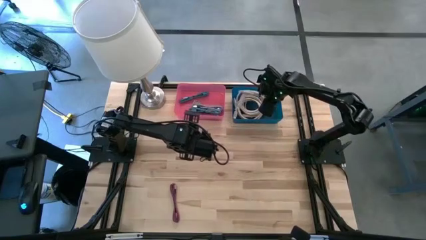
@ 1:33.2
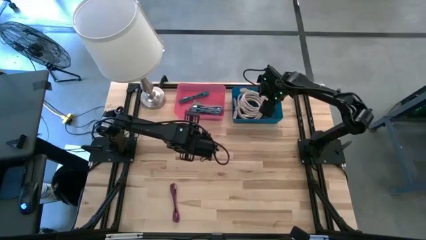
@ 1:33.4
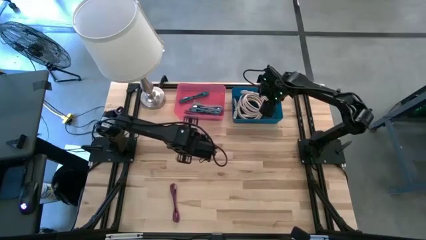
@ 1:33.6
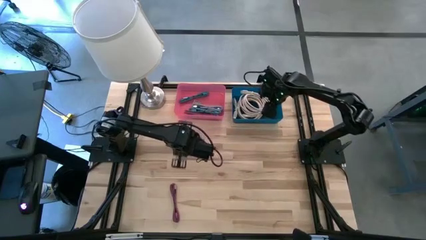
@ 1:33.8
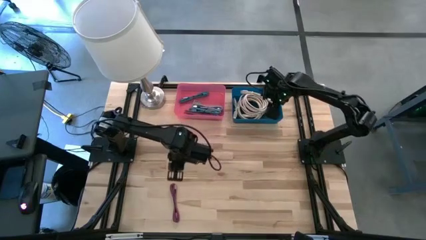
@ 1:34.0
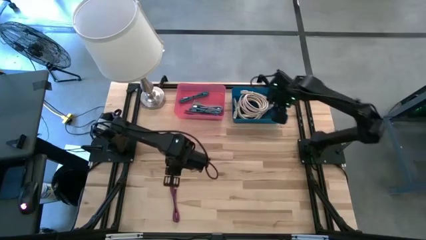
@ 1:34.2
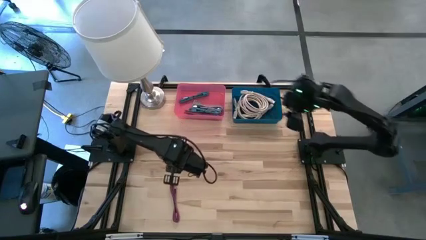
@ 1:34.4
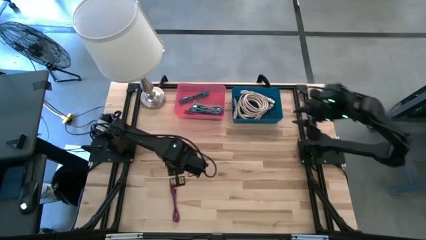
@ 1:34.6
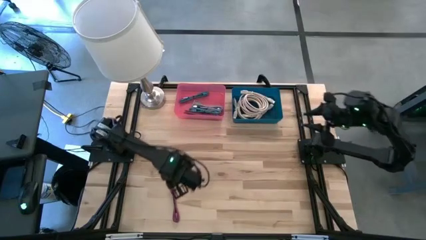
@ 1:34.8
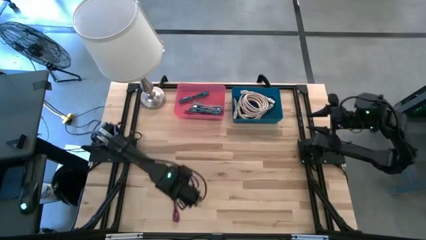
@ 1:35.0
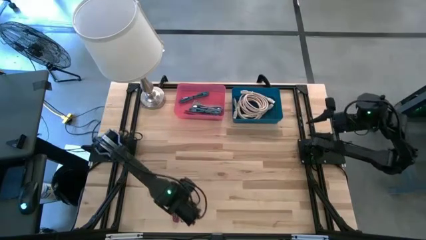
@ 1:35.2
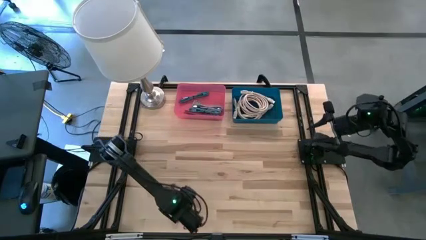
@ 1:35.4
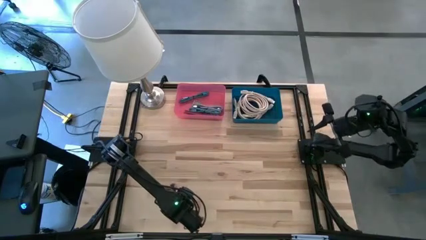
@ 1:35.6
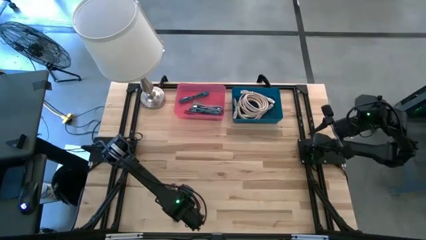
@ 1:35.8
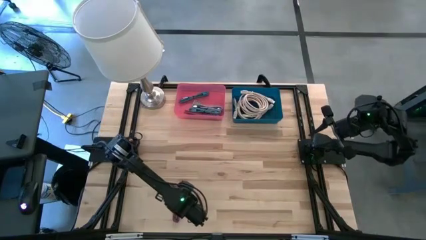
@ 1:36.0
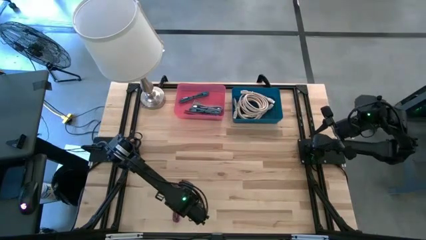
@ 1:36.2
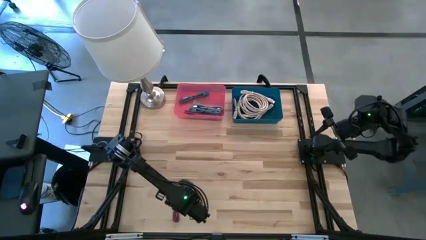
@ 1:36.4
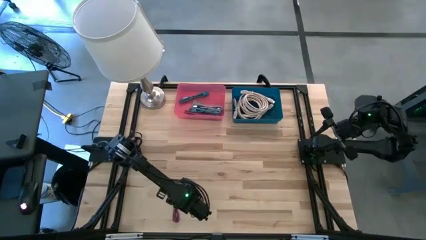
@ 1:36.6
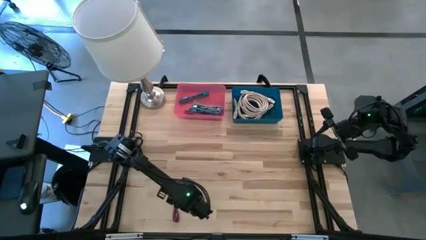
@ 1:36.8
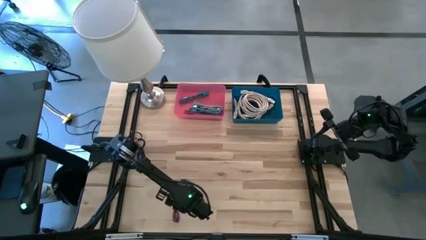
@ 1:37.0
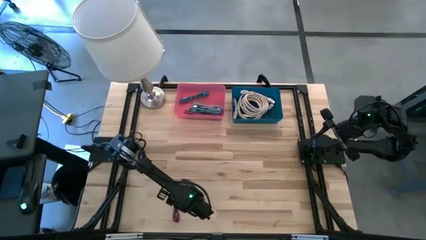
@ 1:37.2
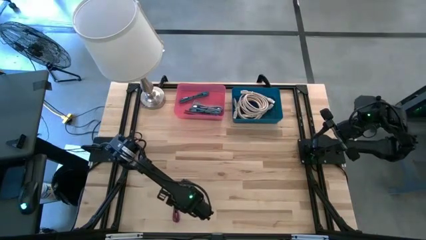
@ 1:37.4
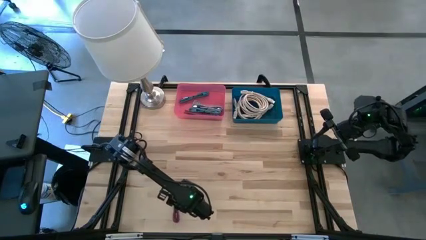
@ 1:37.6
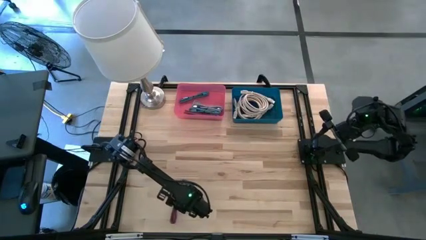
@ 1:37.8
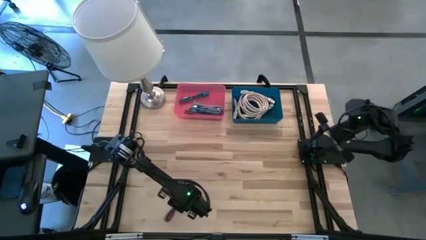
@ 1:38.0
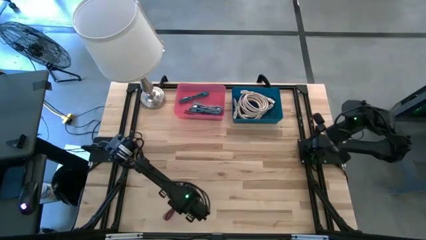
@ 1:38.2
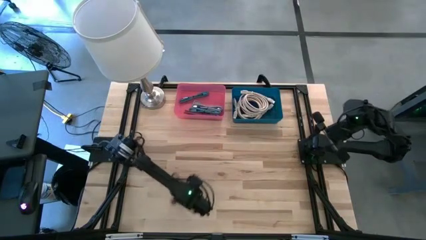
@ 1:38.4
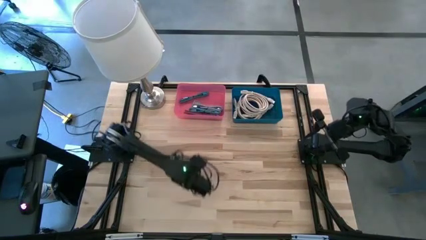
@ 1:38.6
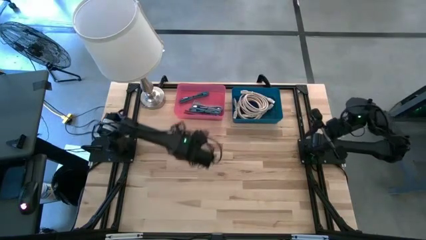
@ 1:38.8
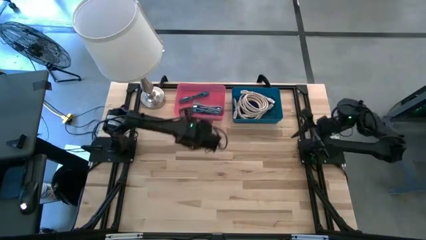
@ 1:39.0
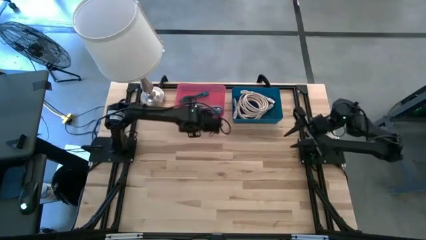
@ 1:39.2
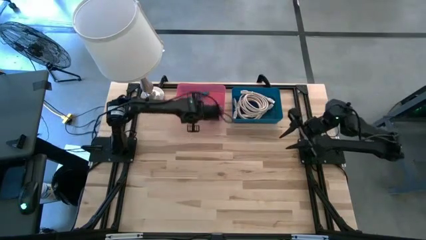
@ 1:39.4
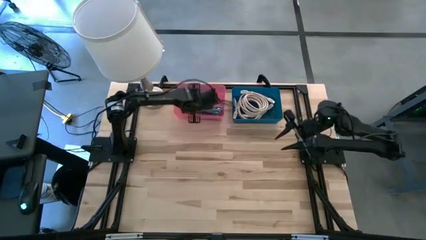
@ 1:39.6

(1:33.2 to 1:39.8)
Task: Pick & Place USB Port
Put the black and pink charger cable into the red bin

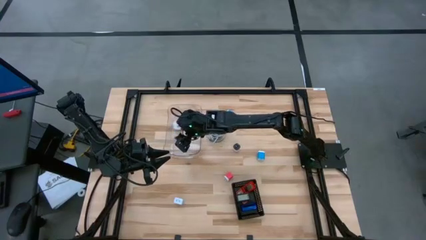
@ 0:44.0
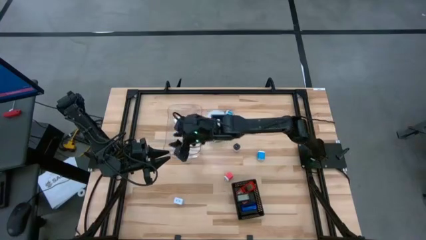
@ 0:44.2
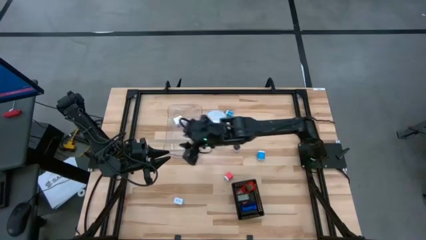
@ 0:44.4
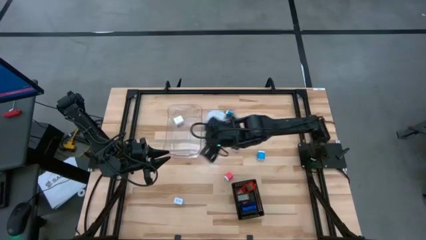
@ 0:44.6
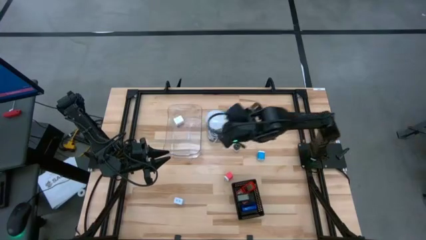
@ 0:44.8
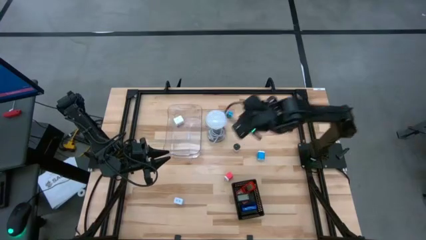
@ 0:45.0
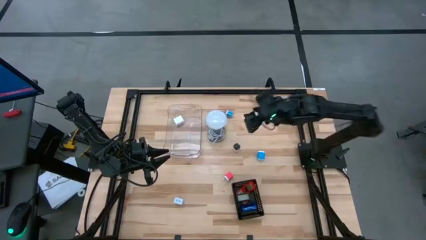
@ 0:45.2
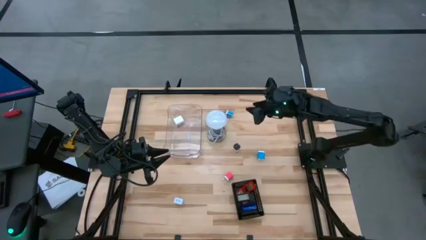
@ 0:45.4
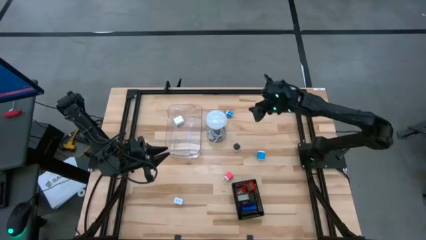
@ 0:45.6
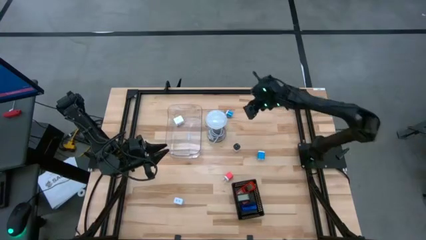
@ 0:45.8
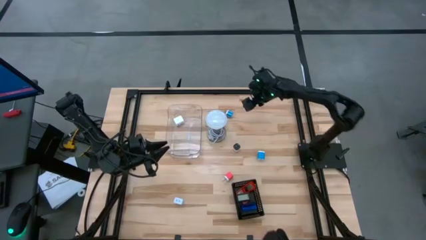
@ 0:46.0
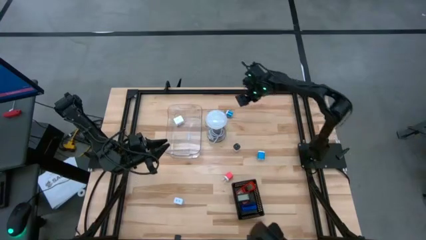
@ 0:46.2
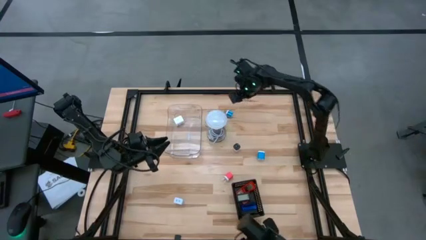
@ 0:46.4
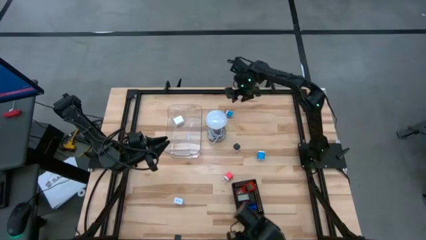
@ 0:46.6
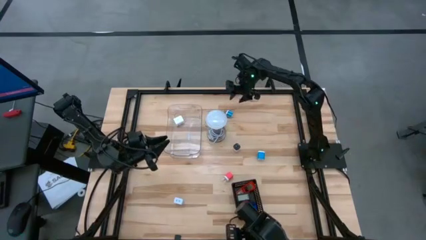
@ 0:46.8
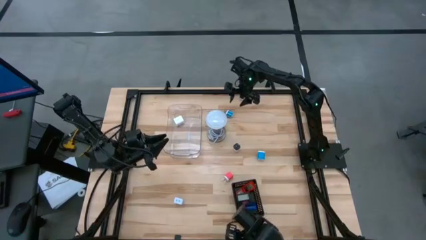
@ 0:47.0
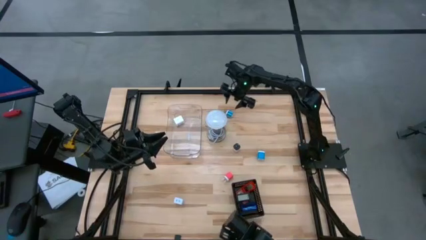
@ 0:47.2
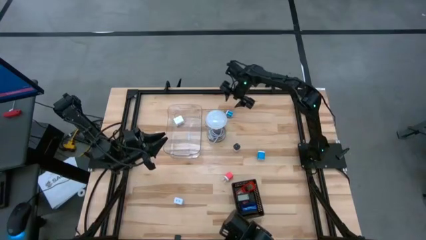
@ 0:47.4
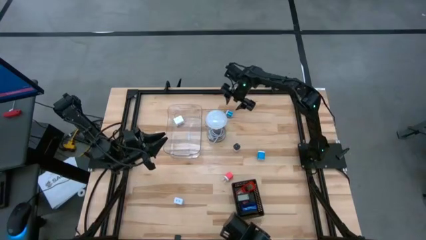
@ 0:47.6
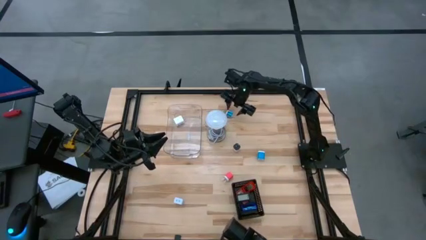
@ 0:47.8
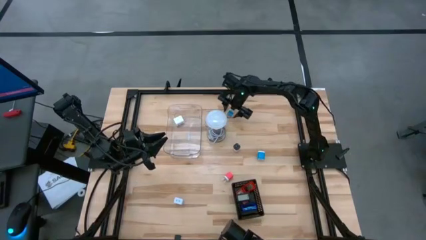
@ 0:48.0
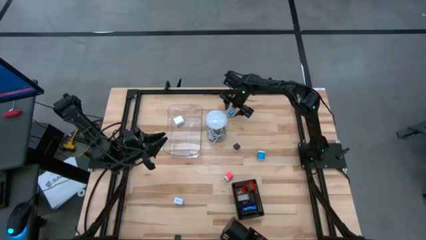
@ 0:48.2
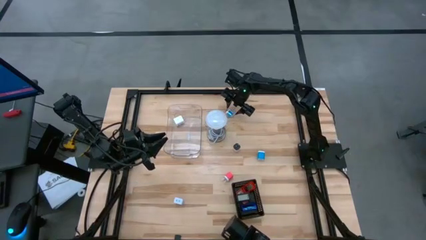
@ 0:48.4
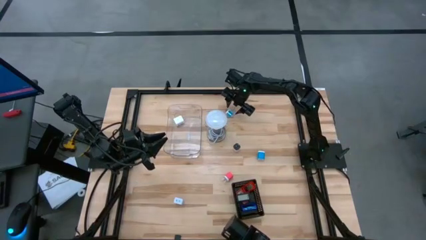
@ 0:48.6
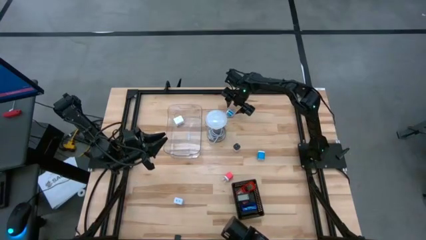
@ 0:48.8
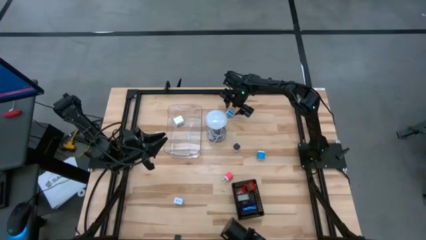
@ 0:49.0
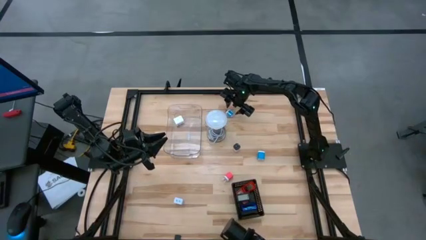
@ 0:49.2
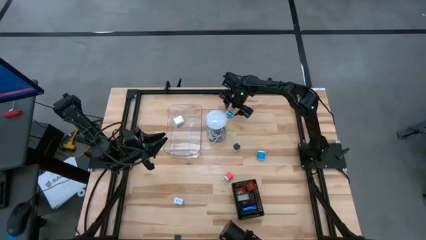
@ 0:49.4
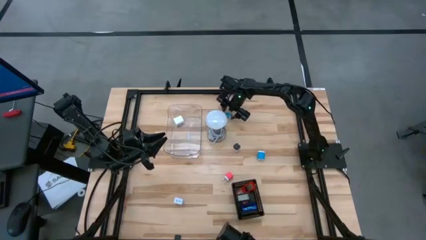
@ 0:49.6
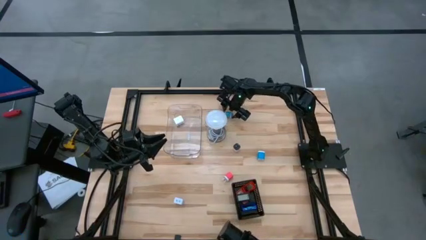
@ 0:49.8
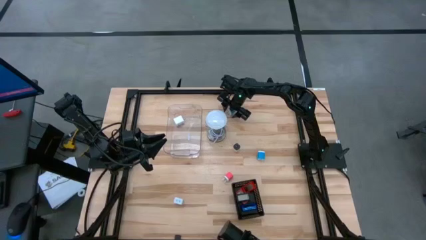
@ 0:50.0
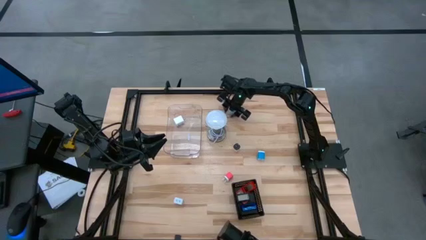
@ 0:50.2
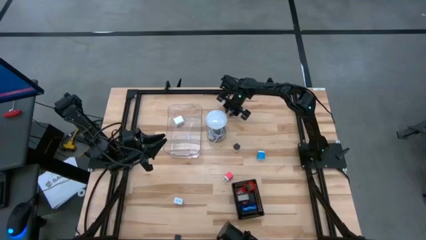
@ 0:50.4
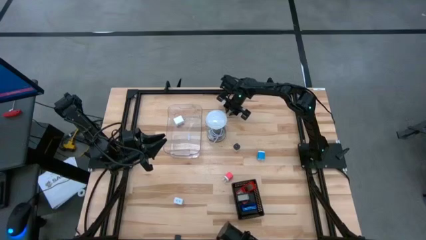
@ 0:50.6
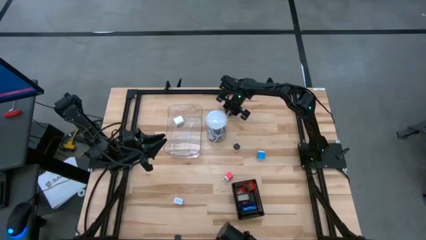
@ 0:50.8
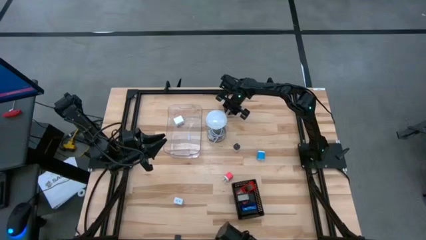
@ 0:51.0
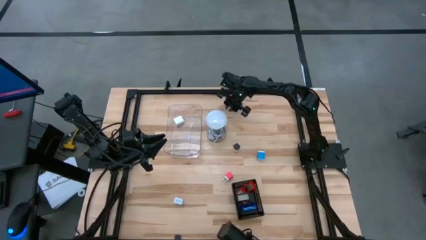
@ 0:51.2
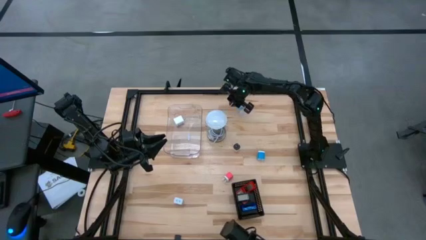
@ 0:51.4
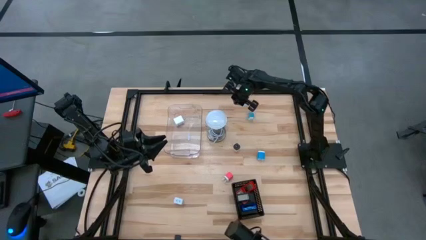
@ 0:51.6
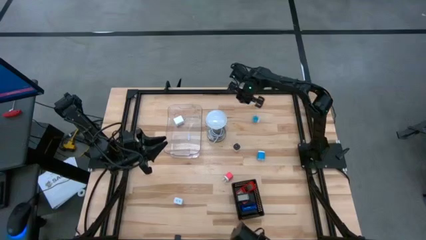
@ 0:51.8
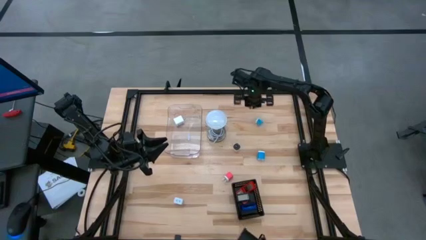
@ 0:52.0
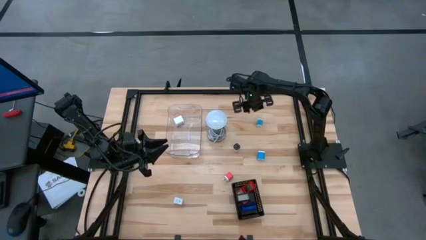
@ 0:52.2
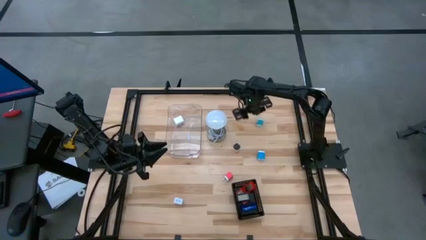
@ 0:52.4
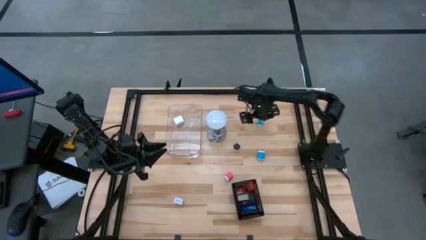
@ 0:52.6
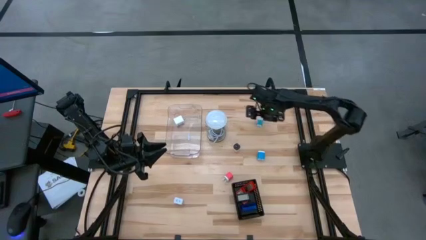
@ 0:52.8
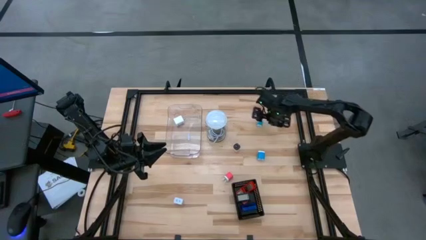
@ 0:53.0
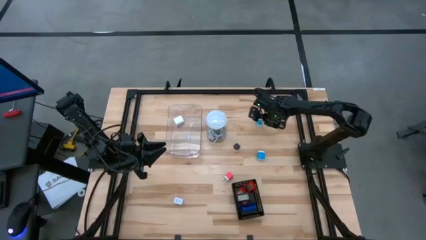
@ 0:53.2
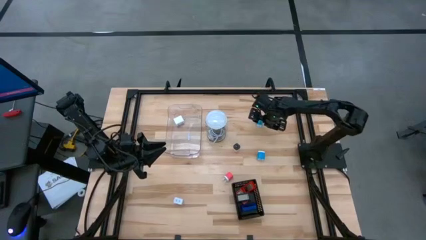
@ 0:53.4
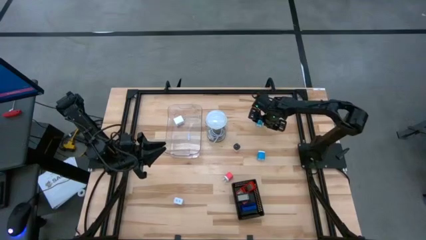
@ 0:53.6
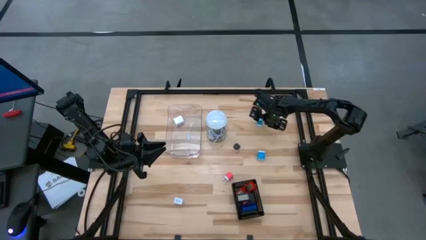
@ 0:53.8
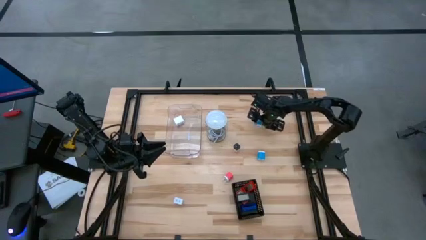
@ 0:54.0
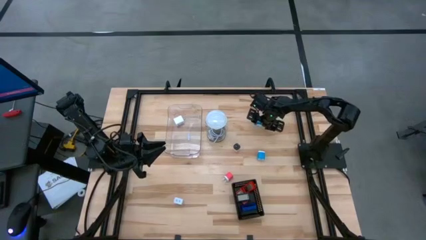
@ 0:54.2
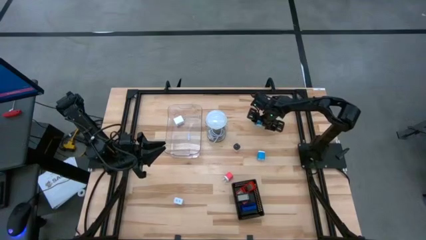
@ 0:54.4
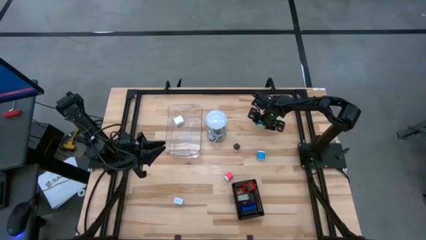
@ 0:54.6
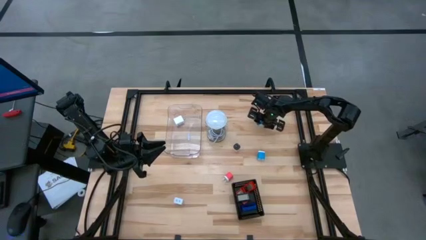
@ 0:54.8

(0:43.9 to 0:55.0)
Task: Pick & Place Office items
Put the top blue charger adapter into the transparent bin
